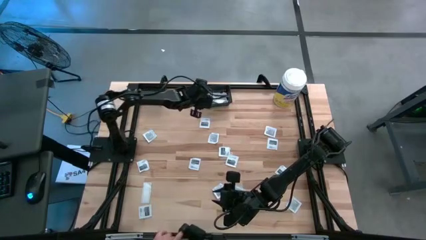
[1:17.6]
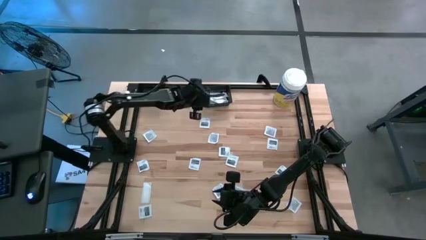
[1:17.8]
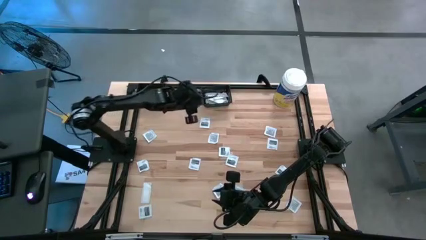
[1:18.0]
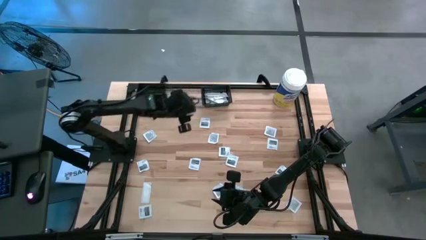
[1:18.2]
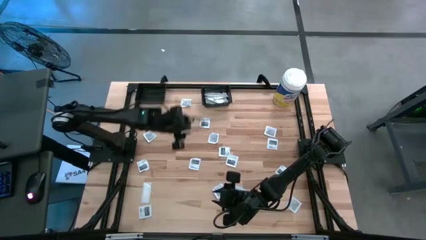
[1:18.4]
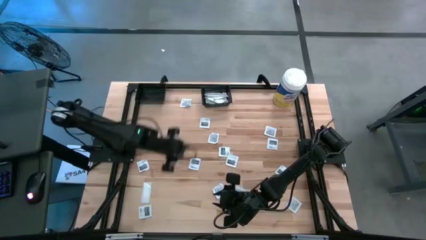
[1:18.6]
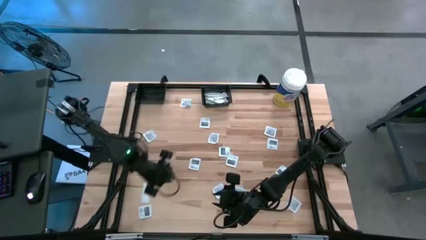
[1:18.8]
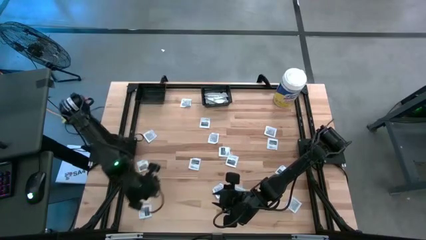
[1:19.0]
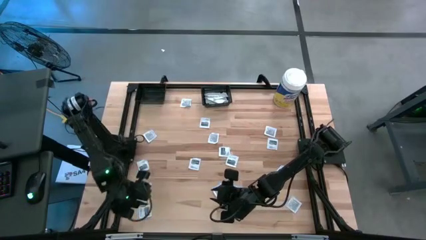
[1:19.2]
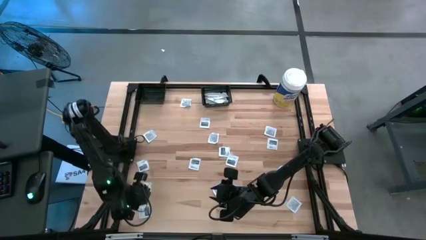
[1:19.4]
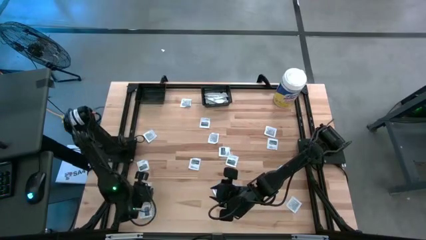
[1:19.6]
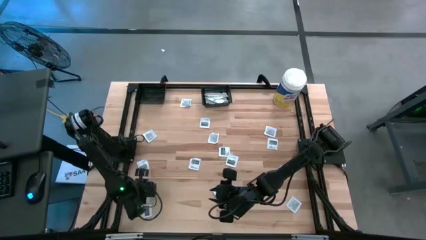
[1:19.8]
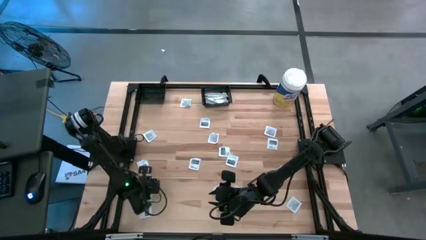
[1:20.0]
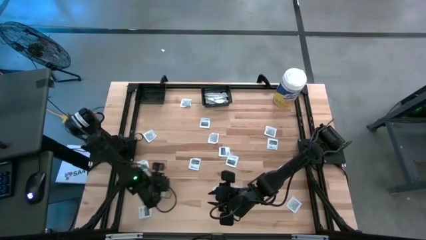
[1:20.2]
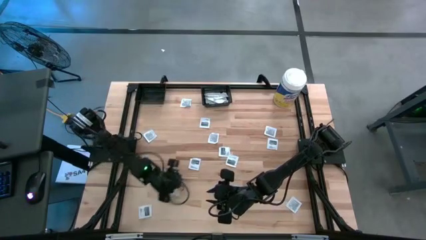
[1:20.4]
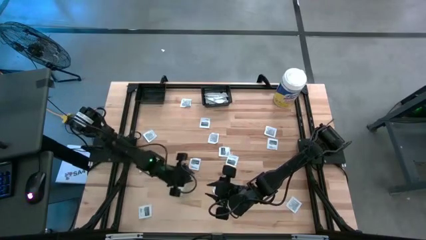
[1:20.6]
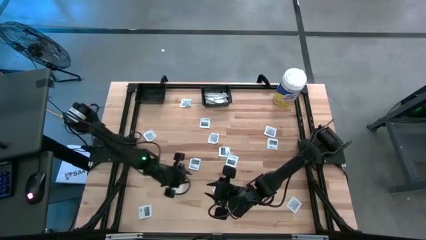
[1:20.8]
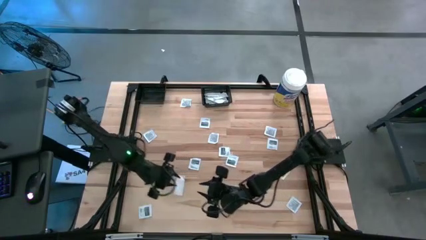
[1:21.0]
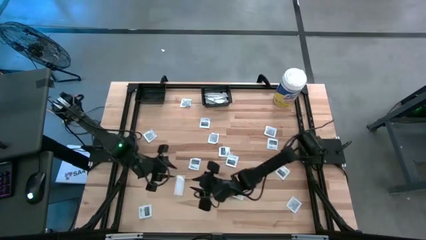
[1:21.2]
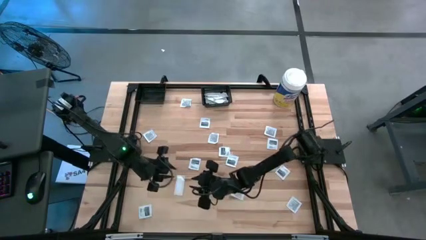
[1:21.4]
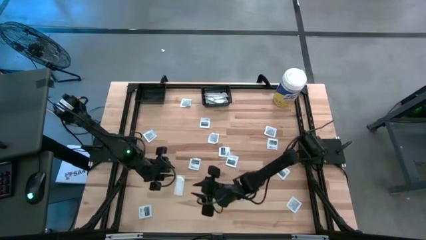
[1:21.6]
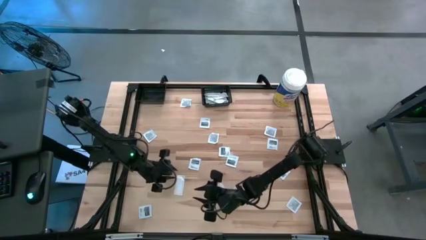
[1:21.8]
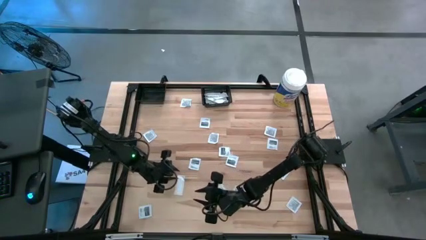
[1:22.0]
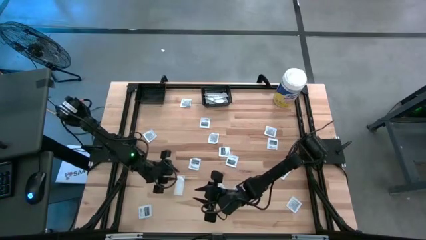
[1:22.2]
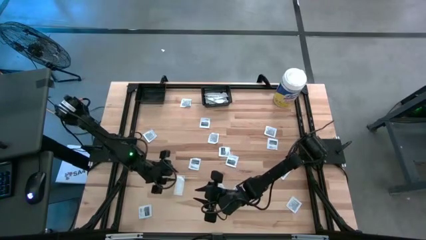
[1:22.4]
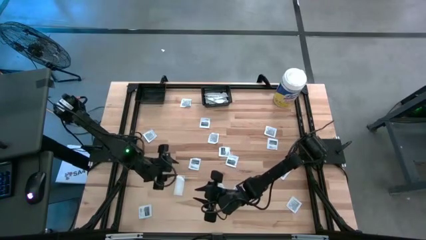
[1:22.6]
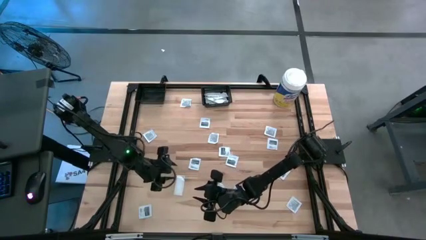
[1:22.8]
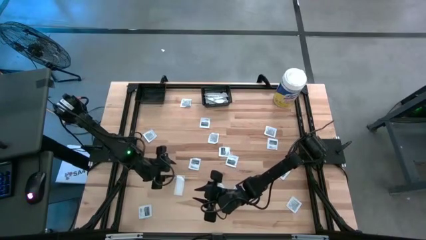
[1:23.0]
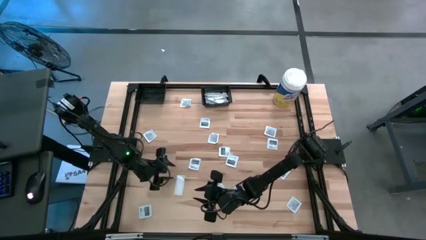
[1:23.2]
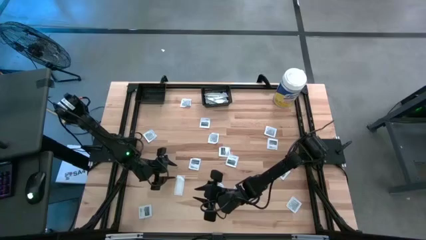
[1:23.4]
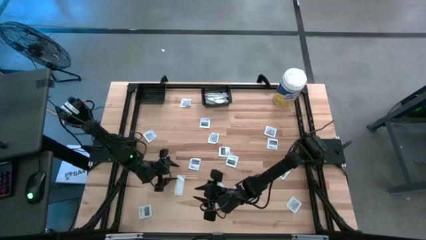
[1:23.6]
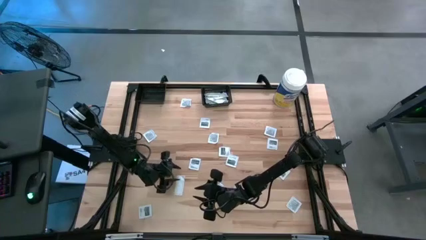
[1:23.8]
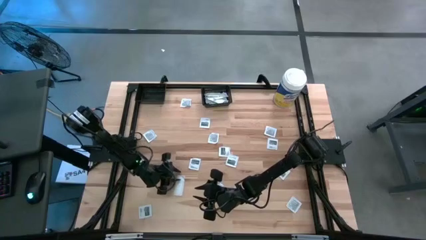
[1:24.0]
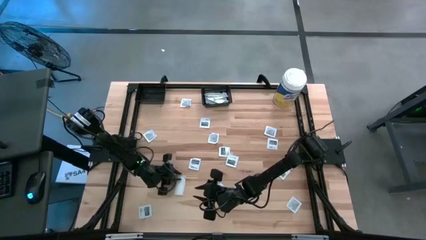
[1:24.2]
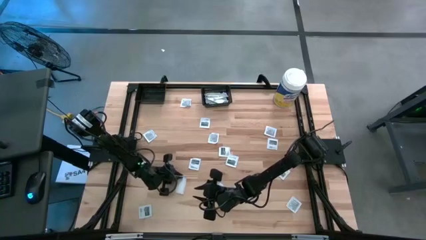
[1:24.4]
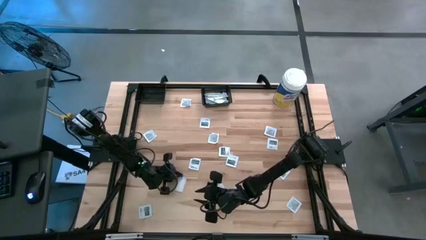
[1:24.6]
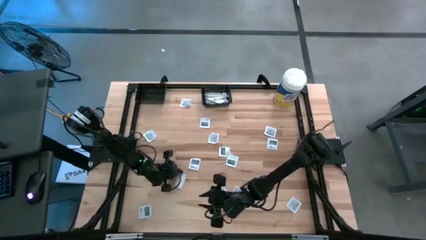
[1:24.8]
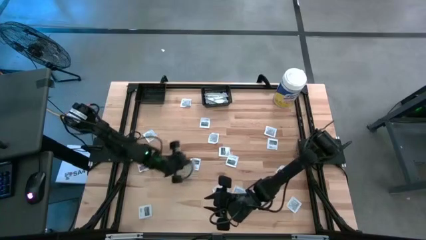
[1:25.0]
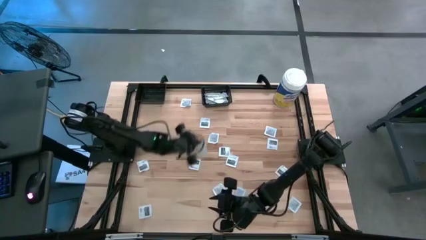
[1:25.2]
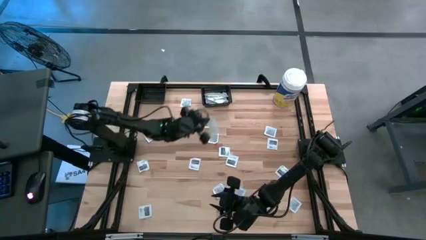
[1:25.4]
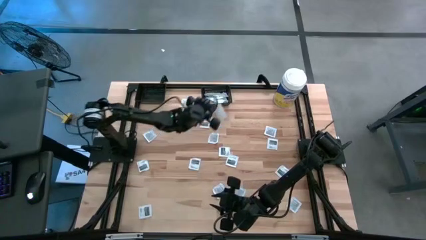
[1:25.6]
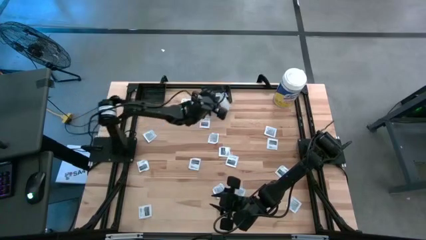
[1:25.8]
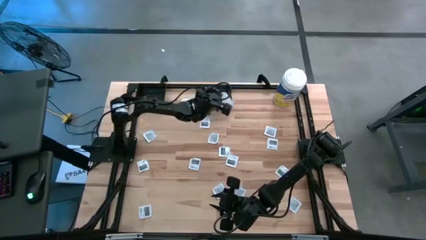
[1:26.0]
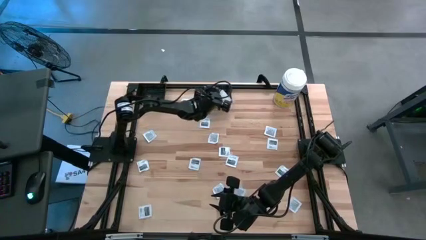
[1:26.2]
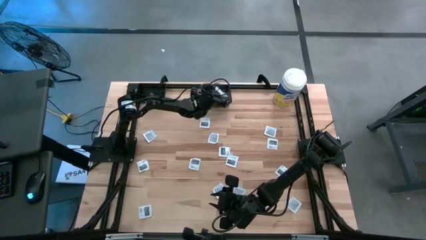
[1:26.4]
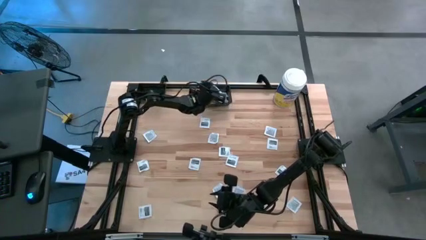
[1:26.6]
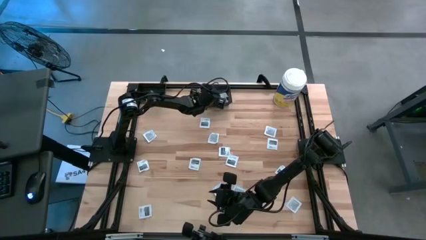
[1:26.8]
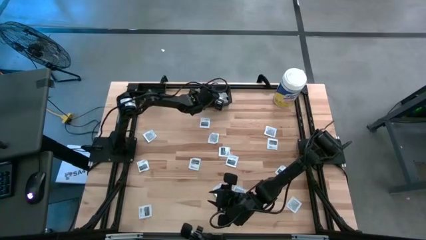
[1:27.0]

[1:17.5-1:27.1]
Task: Pick & Place First Aid Supplies
Put the green bandage pack into the right black bin

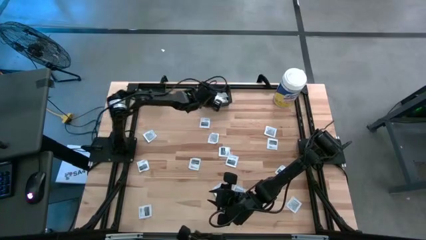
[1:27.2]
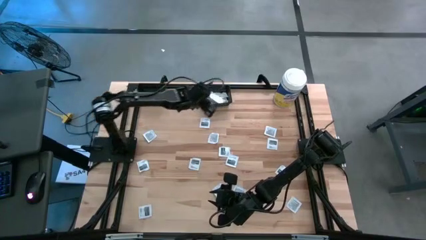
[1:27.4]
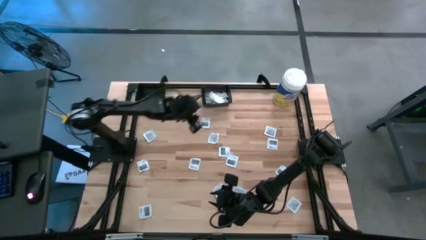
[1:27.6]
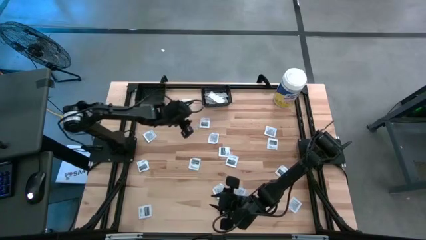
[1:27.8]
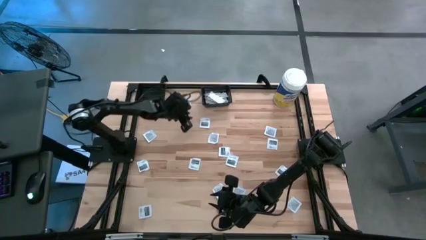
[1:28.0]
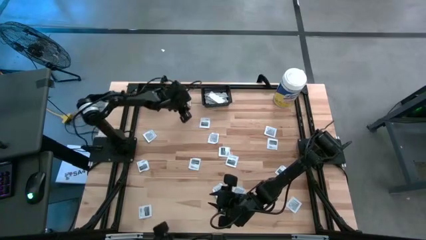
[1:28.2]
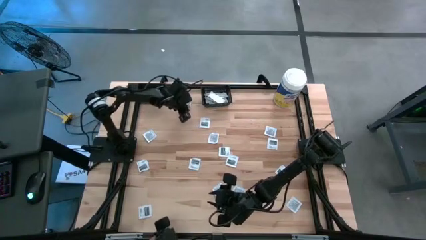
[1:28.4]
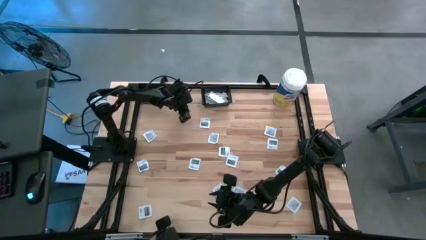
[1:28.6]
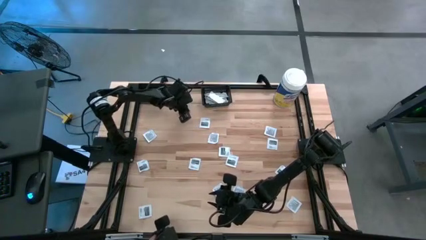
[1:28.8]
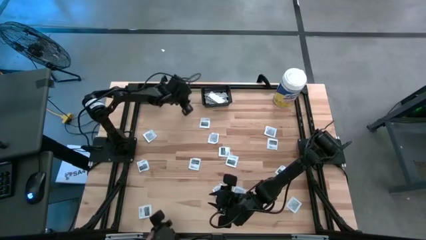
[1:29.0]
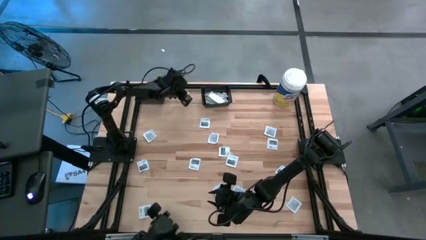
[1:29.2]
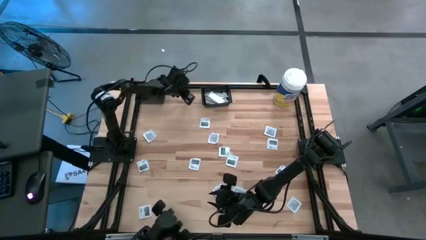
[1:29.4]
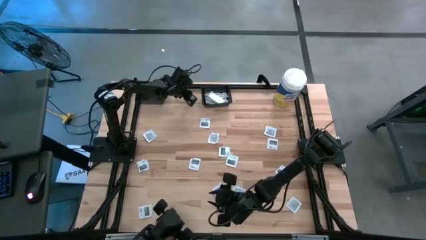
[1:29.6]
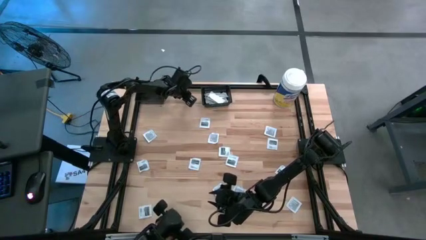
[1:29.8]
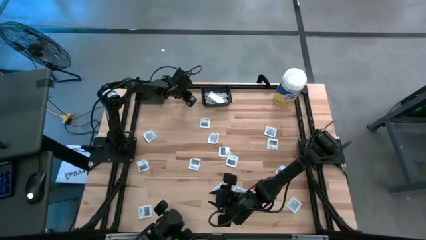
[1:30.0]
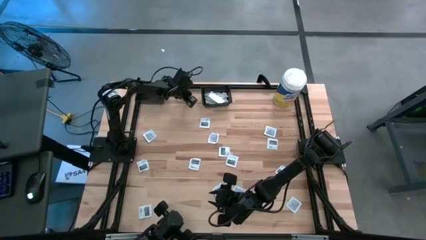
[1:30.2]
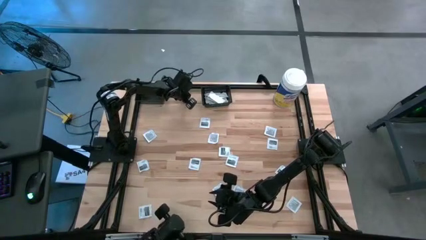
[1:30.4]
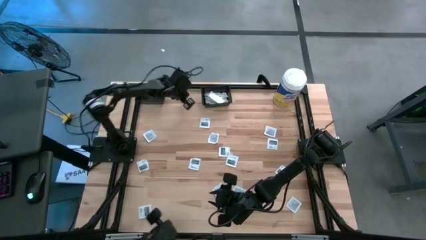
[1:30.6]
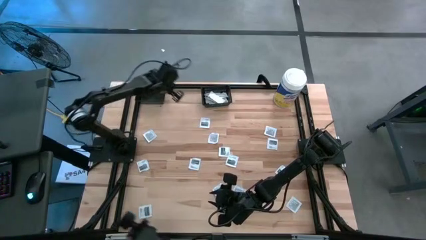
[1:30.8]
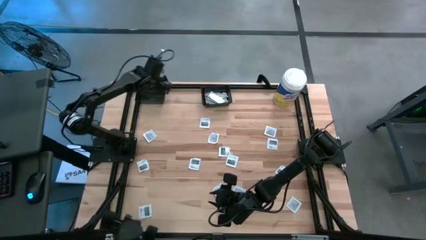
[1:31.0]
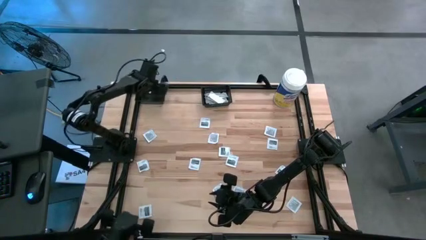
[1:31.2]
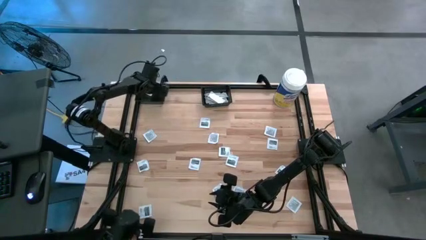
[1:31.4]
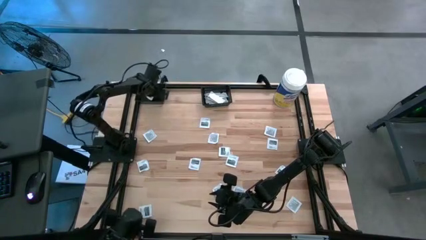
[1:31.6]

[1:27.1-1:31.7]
Put the gray towelette pack into the left black bin

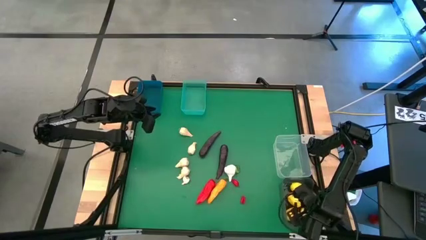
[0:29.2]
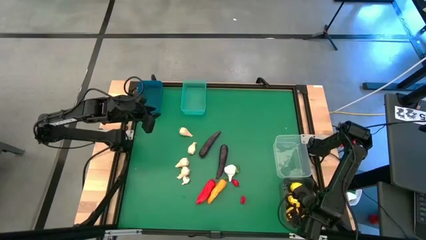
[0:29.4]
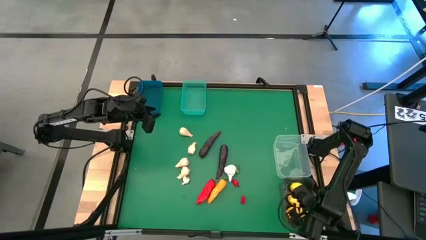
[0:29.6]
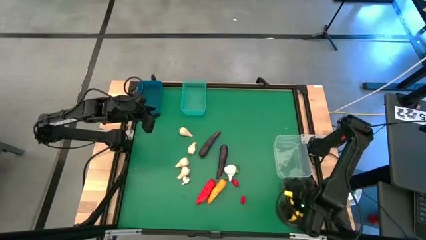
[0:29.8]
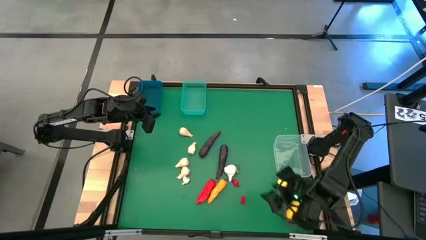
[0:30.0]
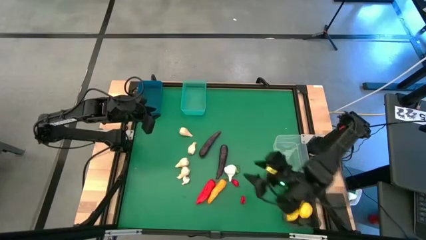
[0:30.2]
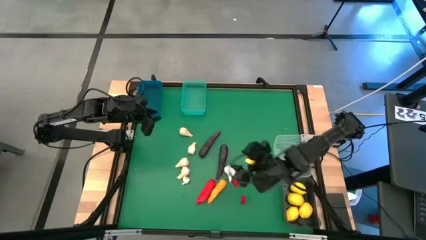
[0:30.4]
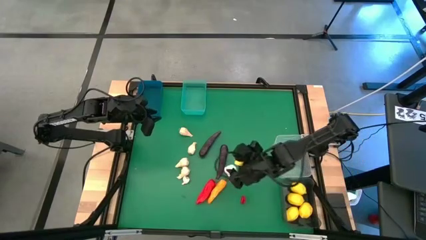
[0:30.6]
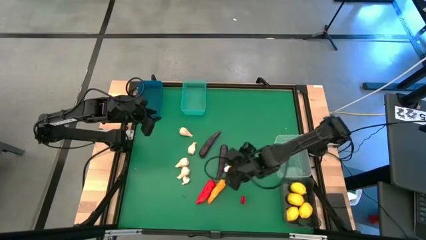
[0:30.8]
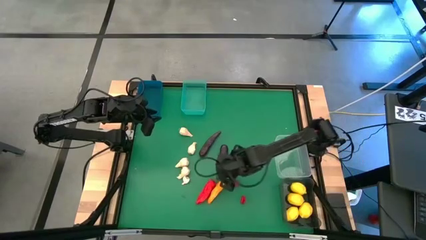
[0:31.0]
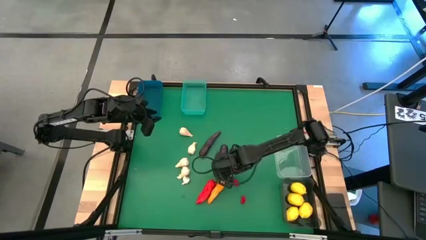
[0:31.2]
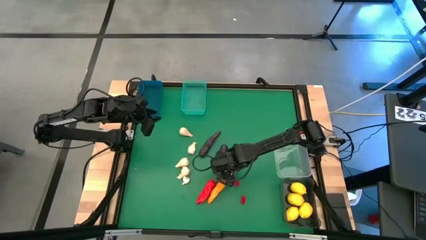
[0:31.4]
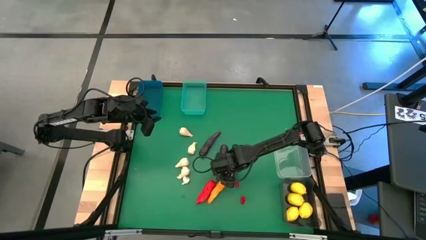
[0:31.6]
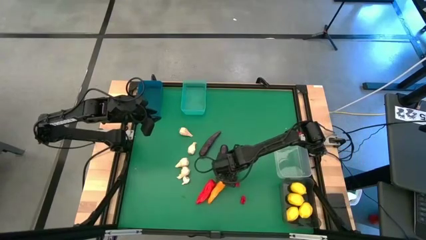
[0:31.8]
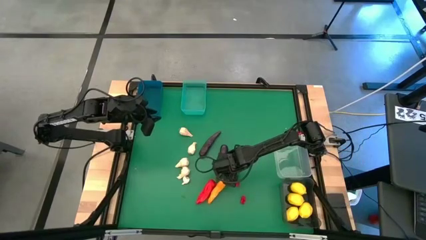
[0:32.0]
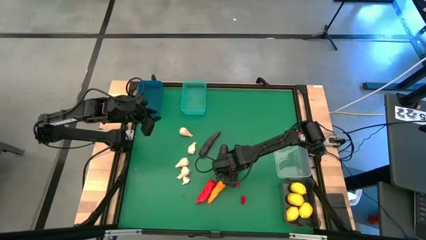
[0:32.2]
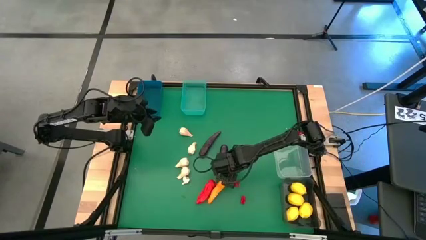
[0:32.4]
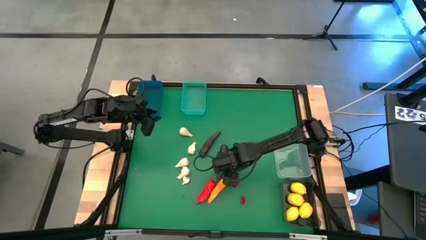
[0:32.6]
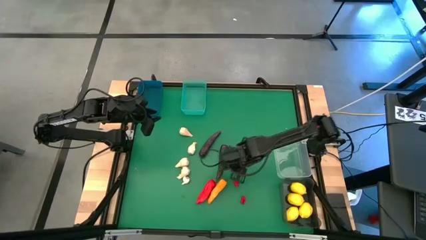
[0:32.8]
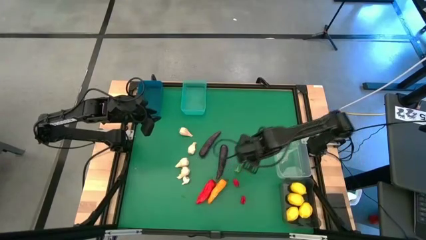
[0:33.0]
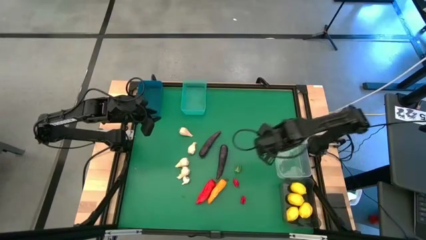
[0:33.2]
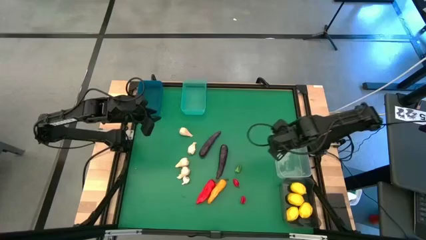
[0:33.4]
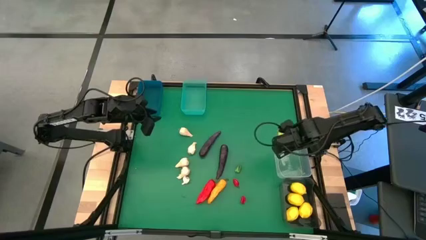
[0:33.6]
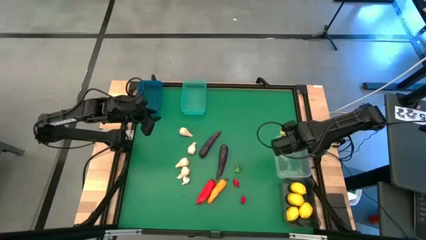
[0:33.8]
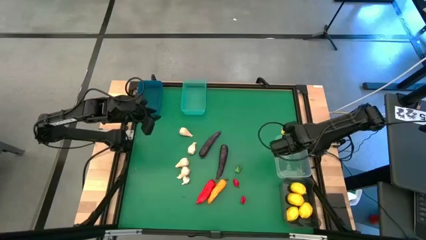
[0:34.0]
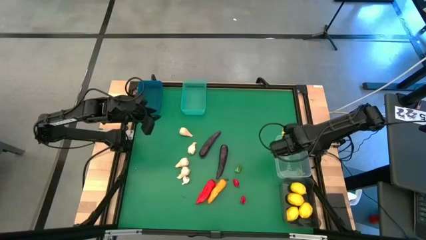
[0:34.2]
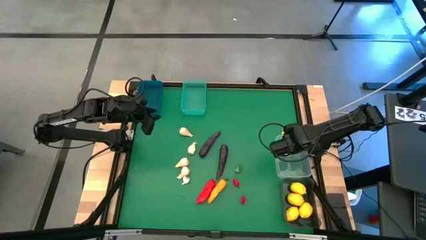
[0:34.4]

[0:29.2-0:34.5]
Task: Sort produce into baskets
Put the white garlic into the transparent bin
